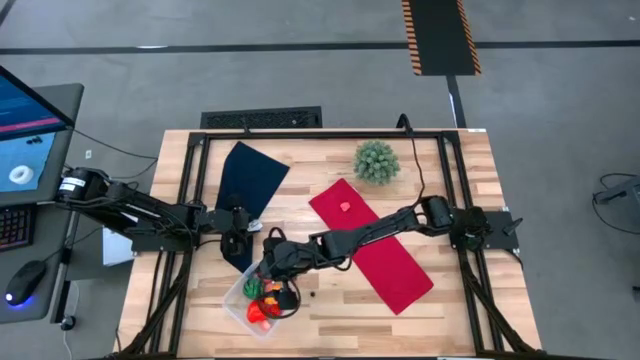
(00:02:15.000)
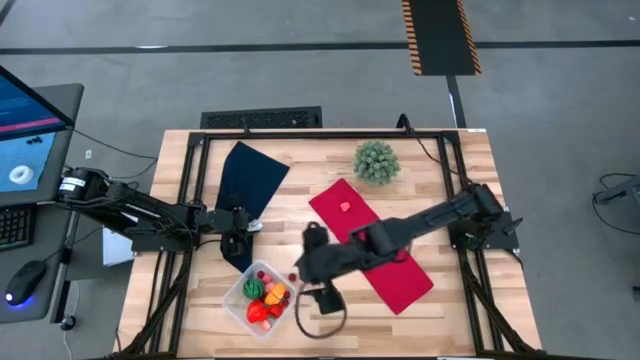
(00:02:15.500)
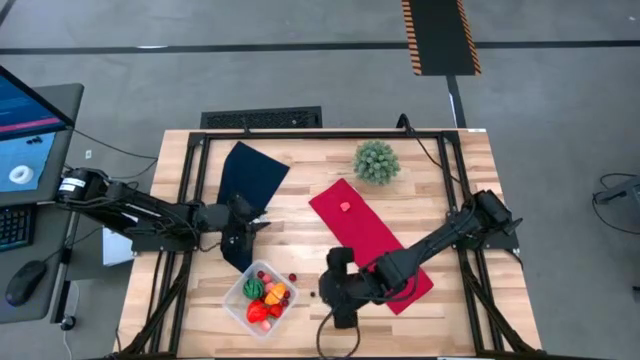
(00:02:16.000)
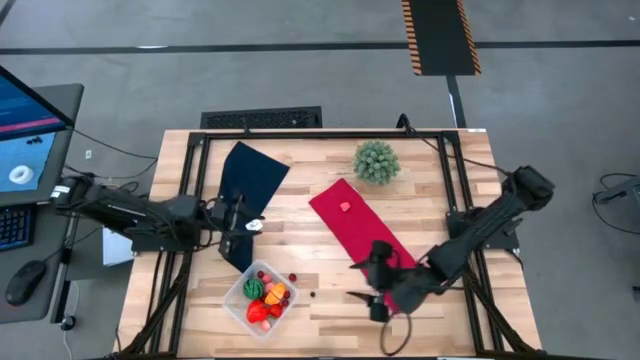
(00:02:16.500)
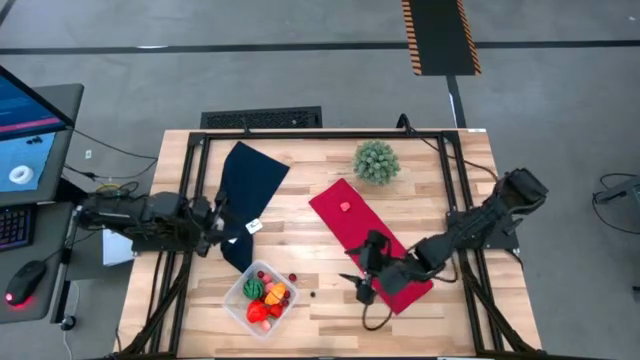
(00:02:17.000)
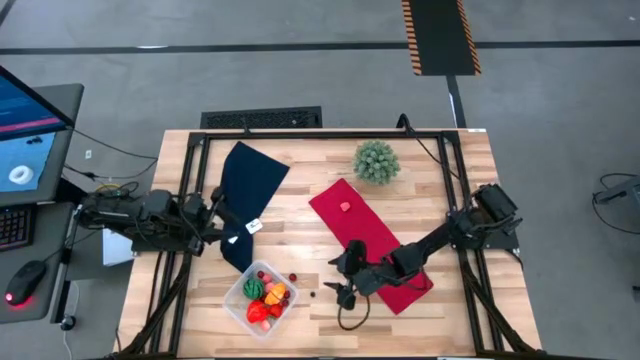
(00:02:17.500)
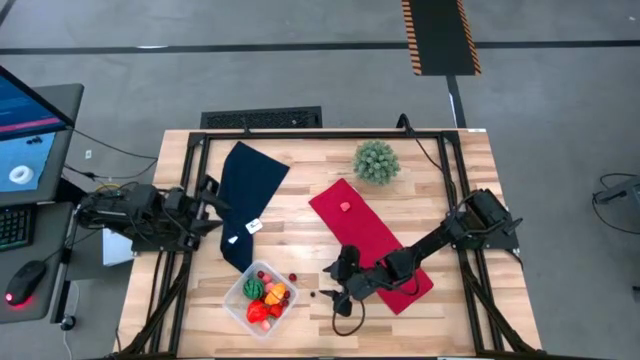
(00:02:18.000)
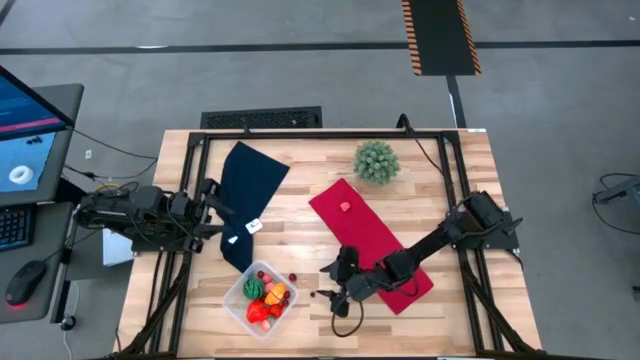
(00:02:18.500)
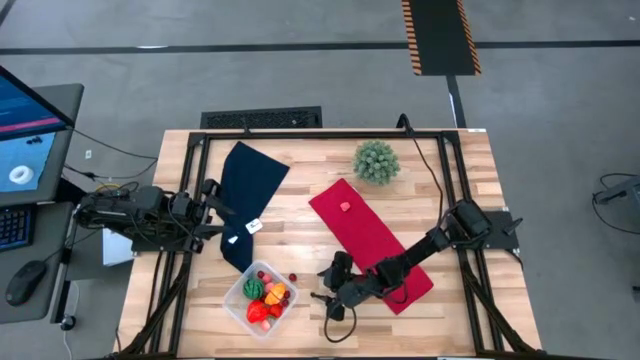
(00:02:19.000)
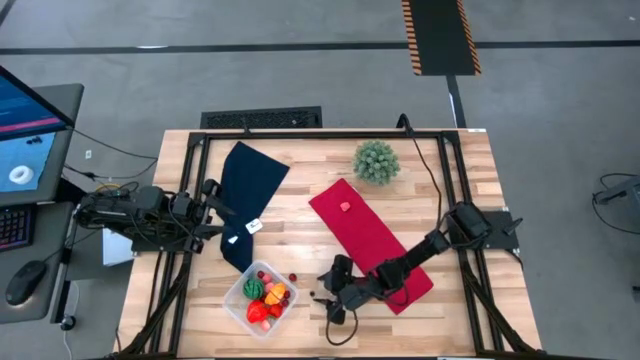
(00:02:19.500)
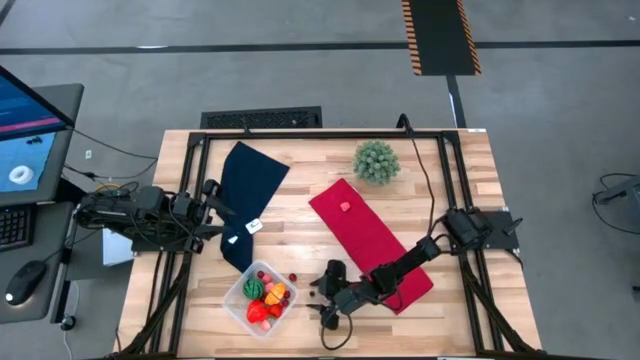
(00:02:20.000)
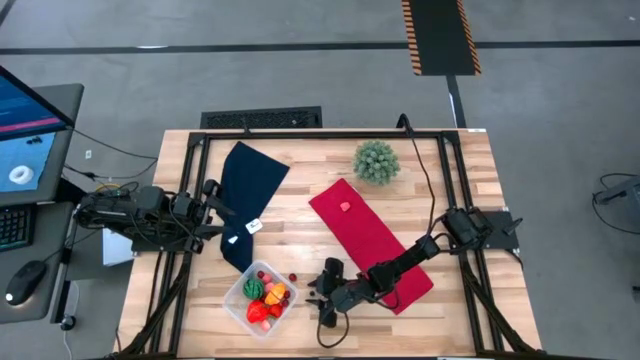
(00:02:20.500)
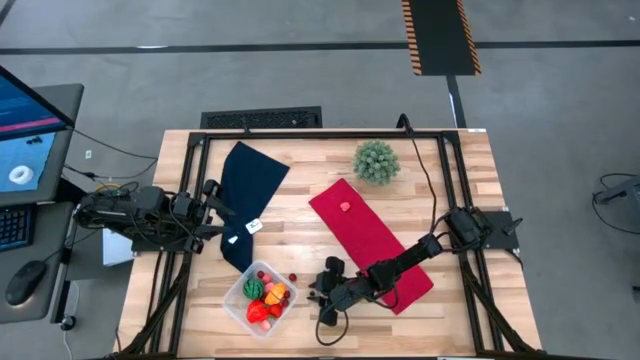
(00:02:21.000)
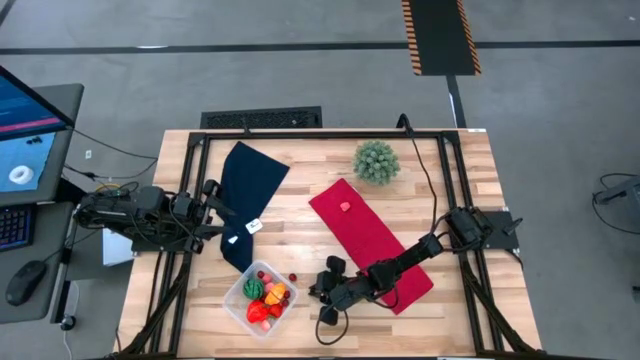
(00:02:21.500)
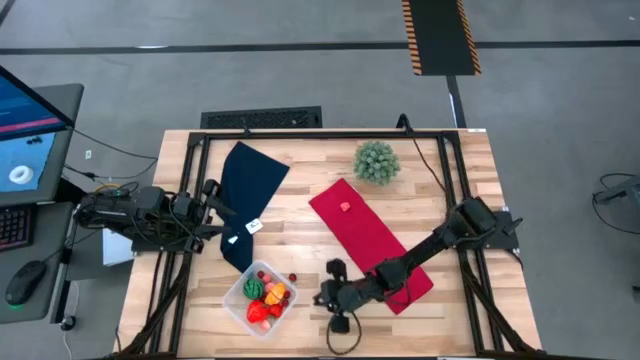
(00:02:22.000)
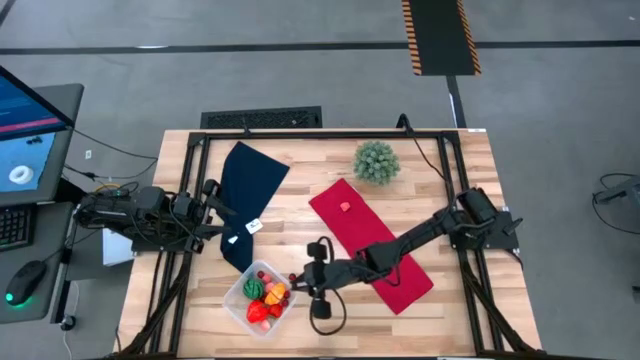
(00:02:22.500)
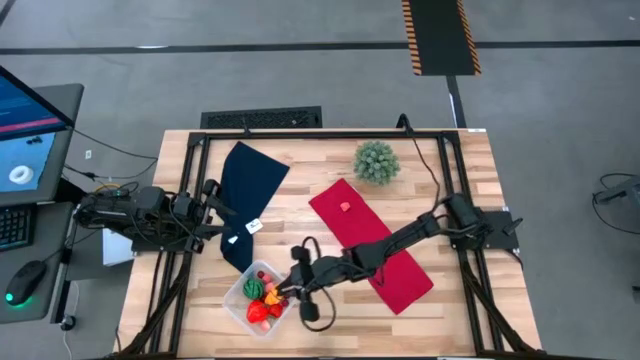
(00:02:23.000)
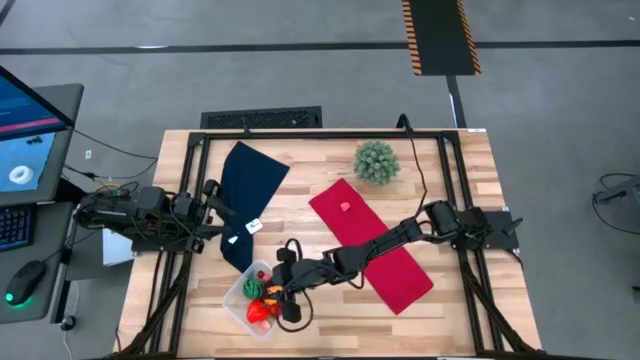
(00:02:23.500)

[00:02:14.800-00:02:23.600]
Task: Pick and placing Produce into tupperware
Put the blueberry into the transparent bin

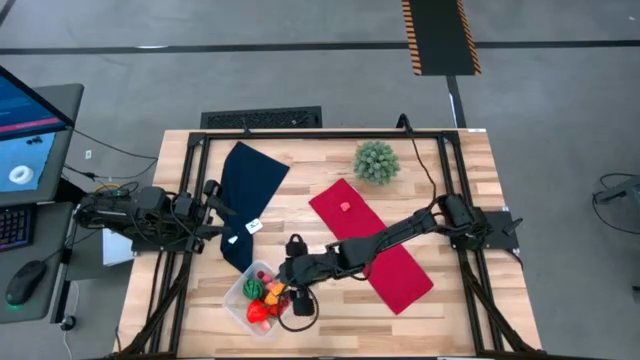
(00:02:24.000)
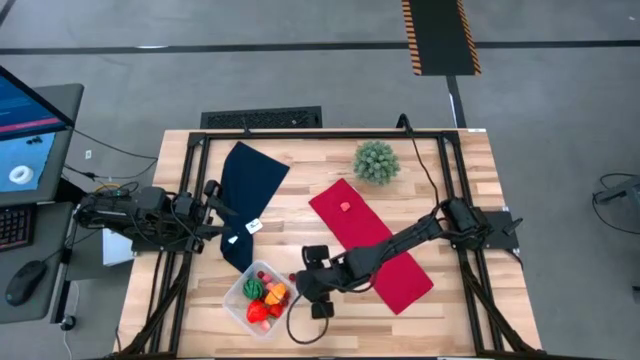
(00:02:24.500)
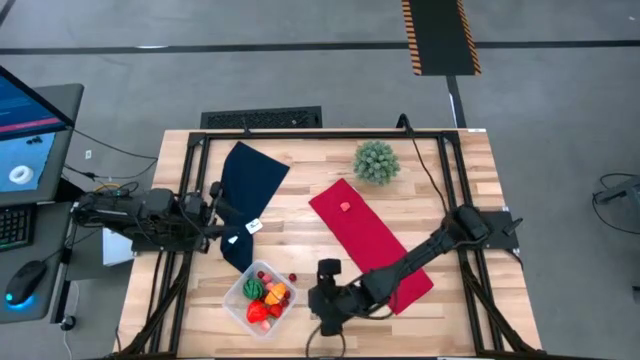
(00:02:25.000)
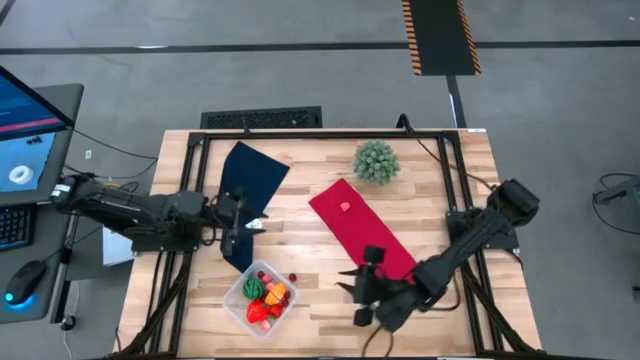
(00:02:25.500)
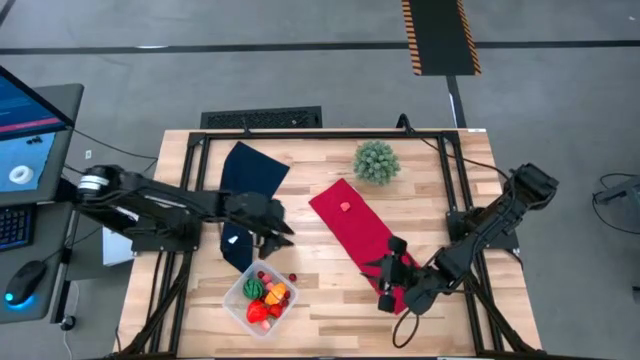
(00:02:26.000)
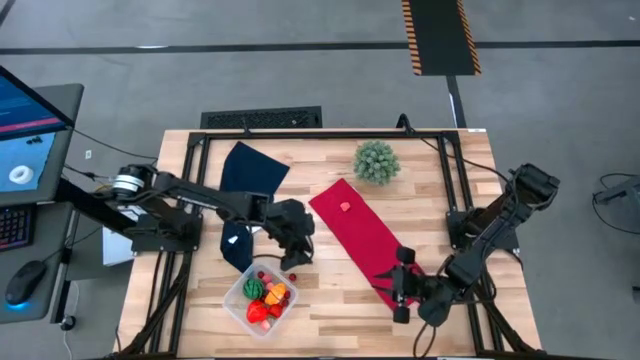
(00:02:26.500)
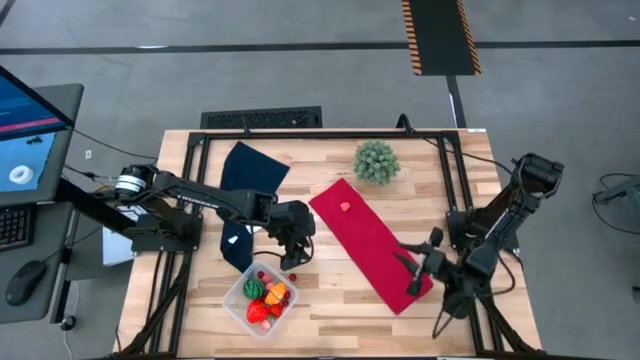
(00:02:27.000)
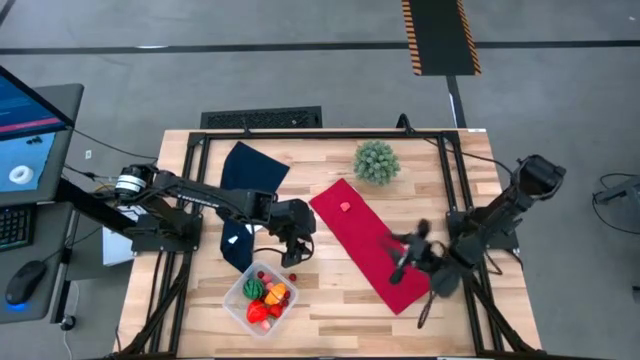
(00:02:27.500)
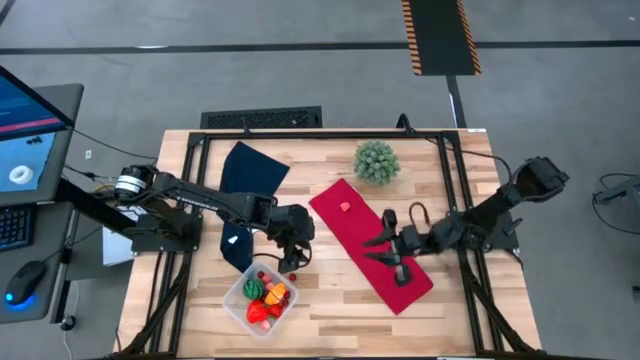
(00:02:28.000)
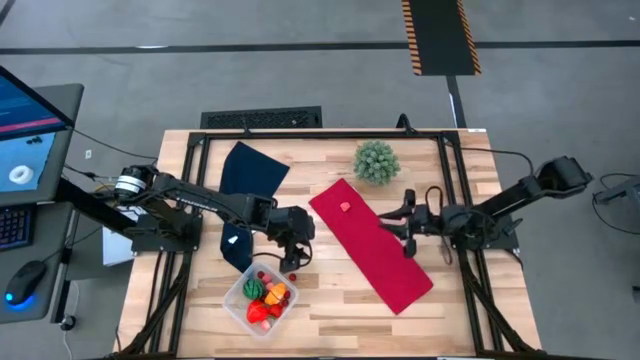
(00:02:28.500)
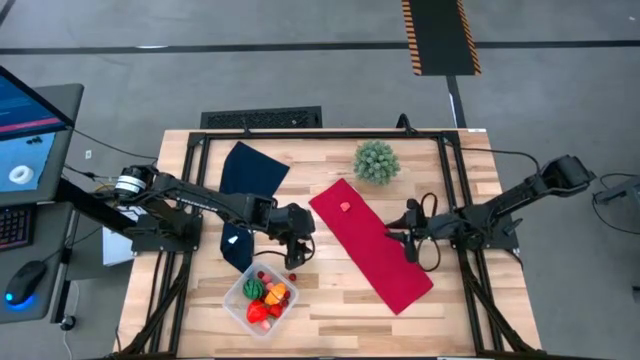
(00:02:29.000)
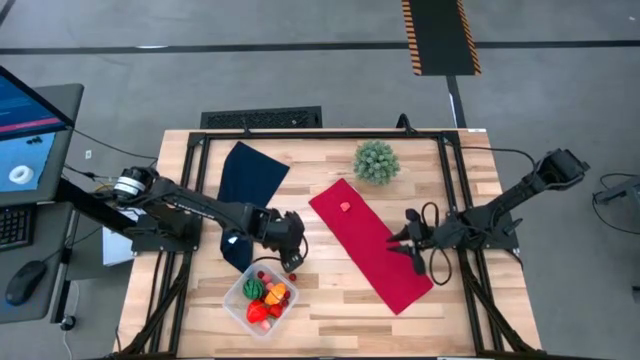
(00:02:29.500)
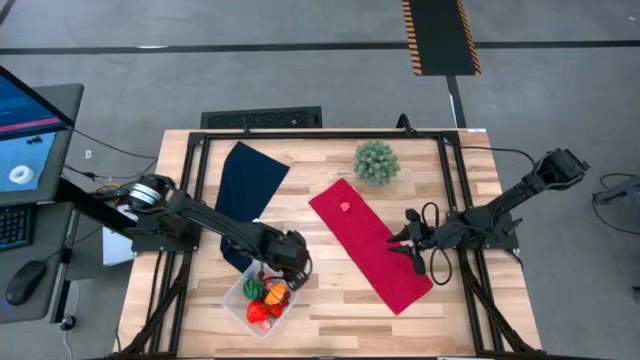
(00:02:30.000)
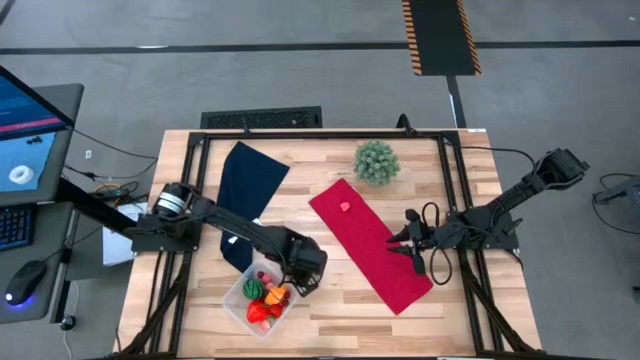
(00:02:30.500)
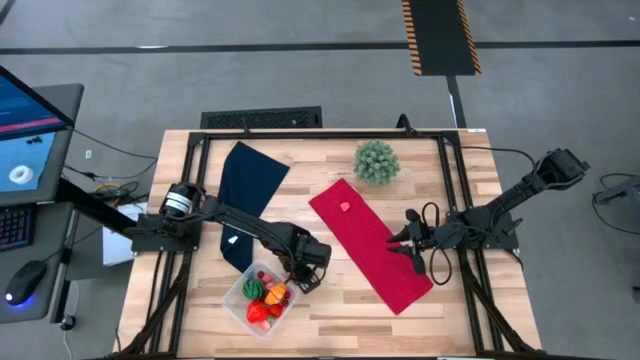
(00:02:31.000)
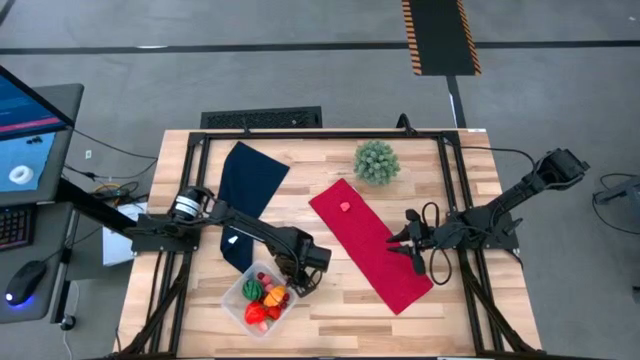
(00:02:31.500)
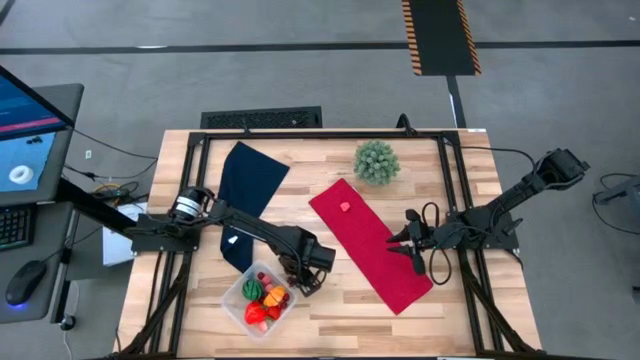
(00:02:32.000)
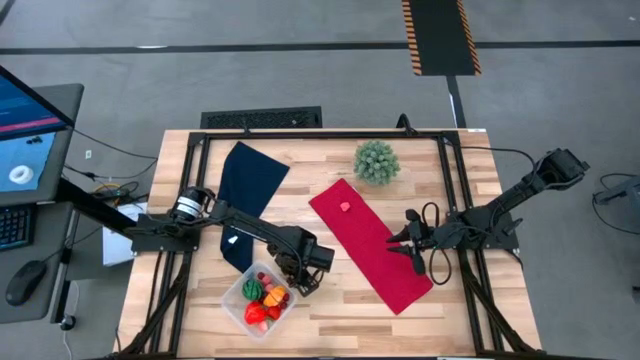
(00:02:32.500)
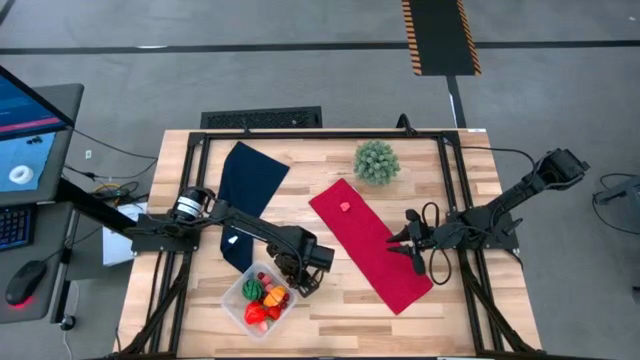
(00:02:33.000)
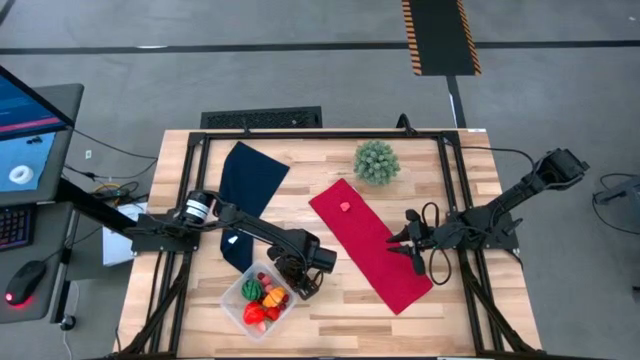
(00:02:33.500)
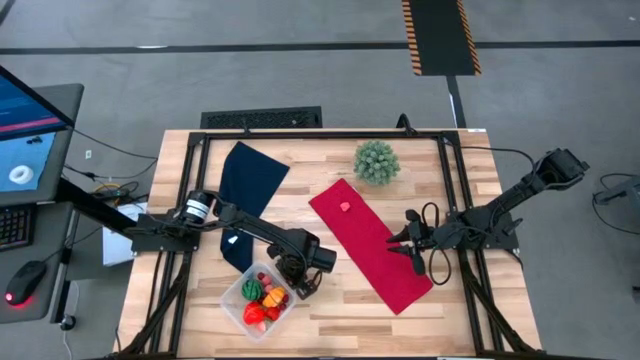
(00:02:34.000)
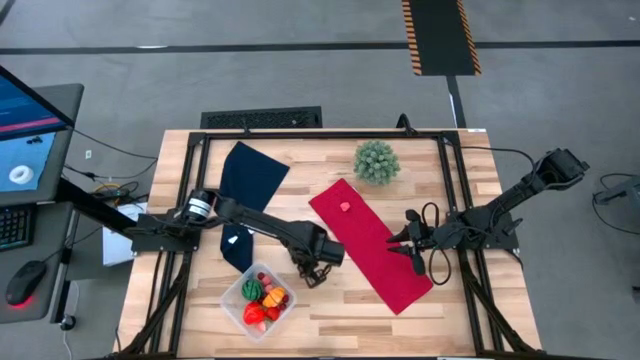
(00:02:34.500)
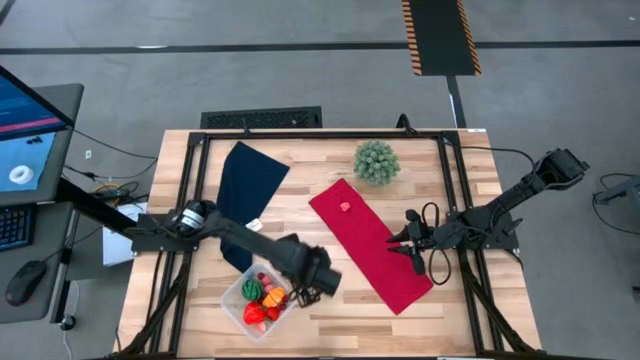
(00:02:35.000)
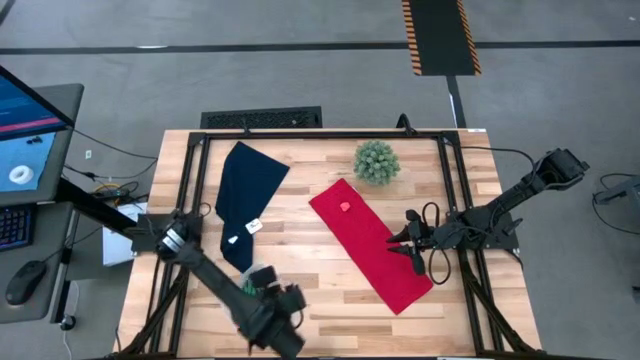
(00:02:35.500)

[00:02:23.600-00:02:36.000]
Put the cherry into the transparent bin
